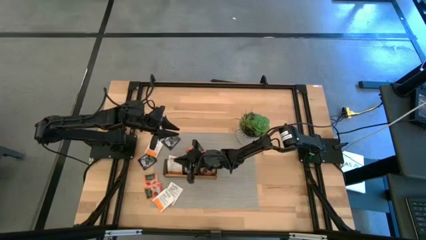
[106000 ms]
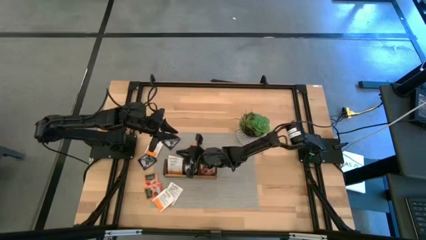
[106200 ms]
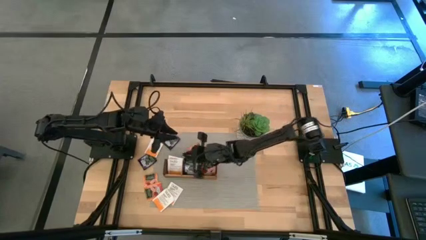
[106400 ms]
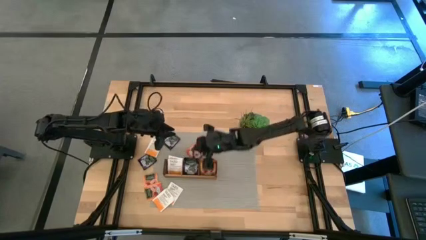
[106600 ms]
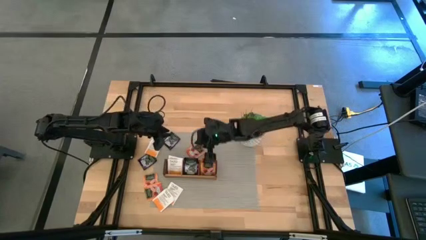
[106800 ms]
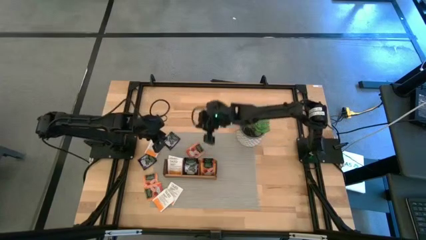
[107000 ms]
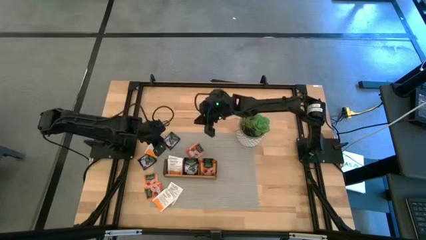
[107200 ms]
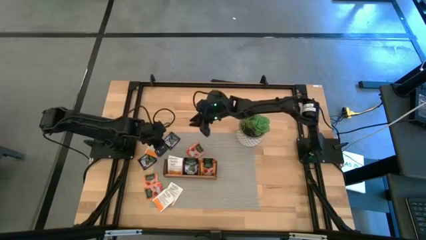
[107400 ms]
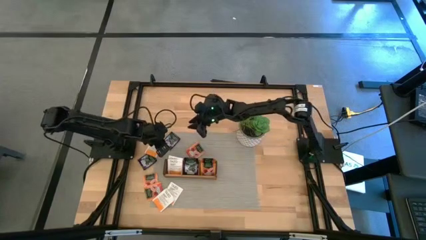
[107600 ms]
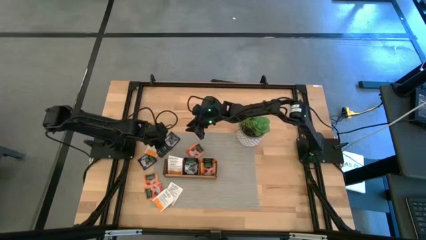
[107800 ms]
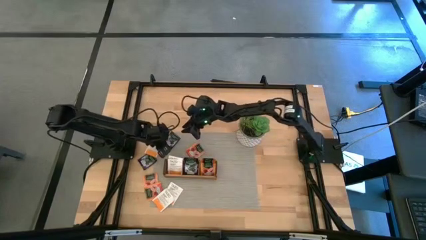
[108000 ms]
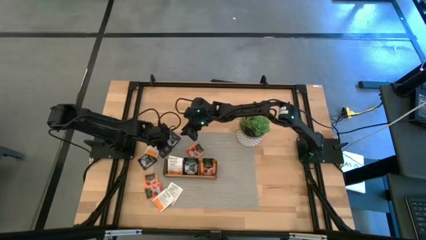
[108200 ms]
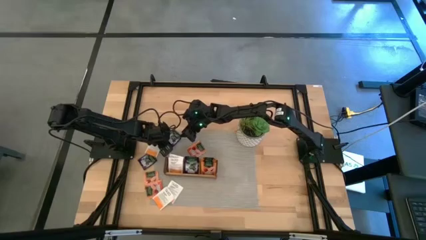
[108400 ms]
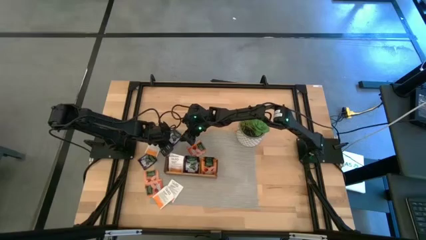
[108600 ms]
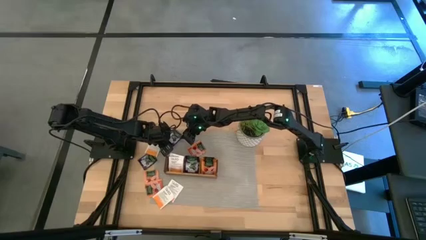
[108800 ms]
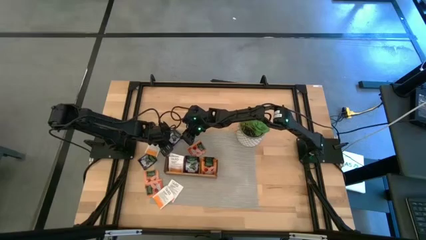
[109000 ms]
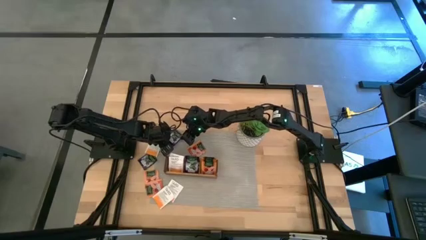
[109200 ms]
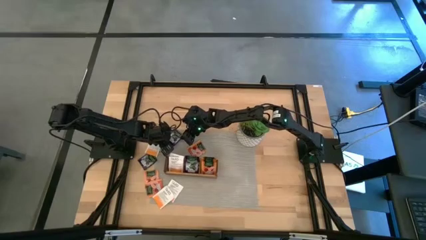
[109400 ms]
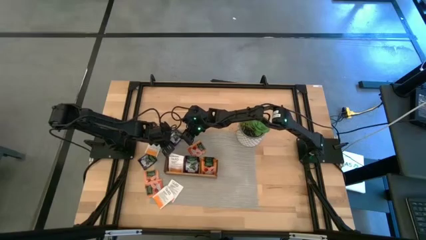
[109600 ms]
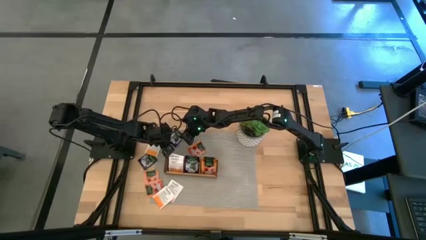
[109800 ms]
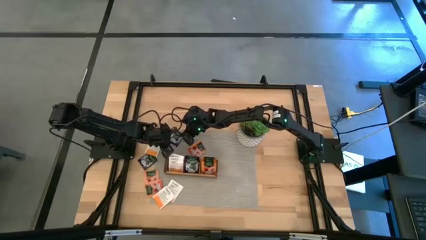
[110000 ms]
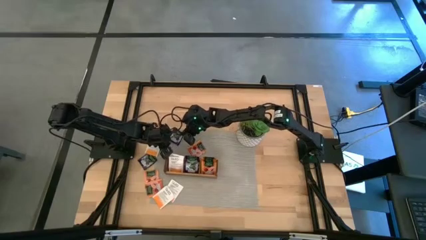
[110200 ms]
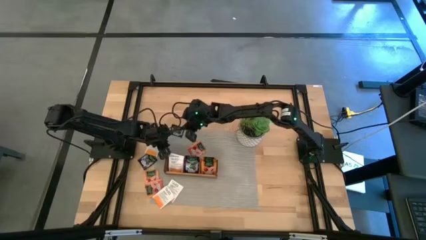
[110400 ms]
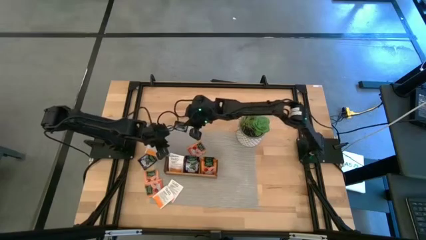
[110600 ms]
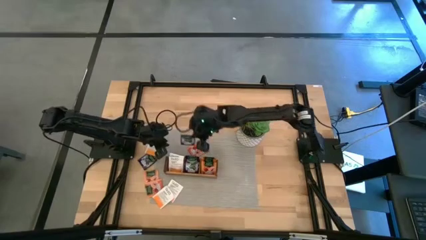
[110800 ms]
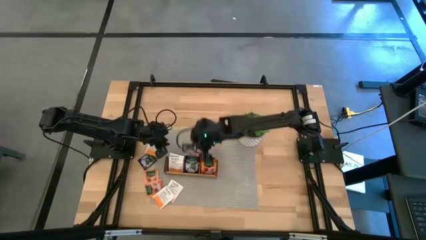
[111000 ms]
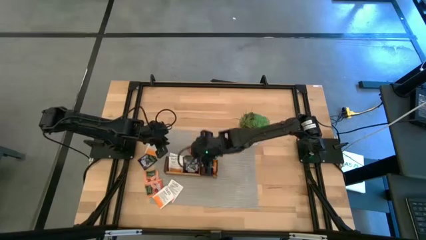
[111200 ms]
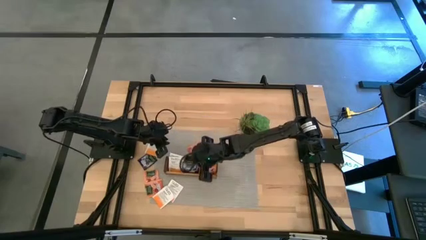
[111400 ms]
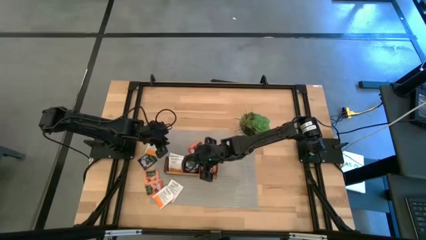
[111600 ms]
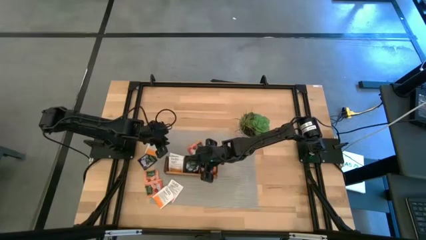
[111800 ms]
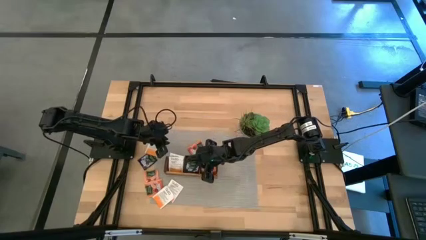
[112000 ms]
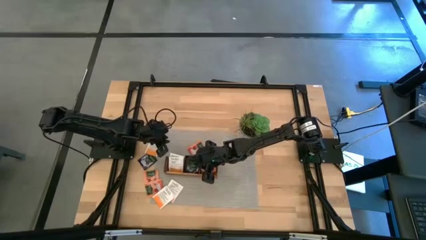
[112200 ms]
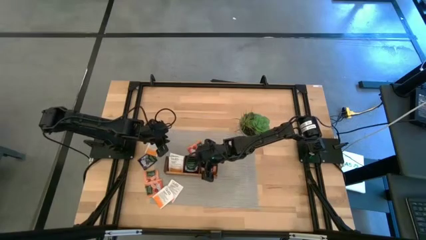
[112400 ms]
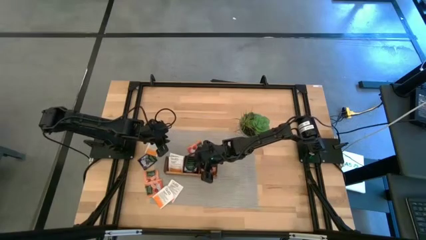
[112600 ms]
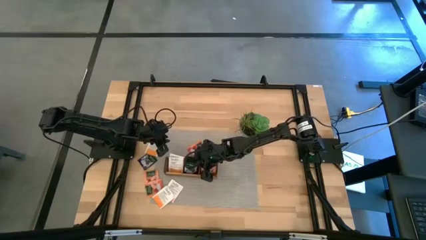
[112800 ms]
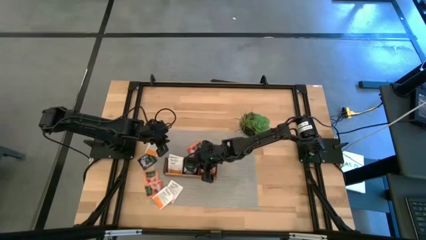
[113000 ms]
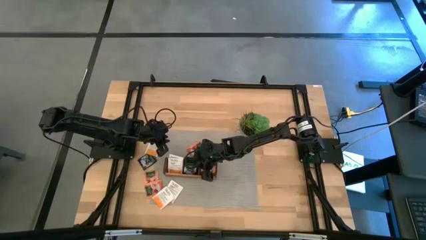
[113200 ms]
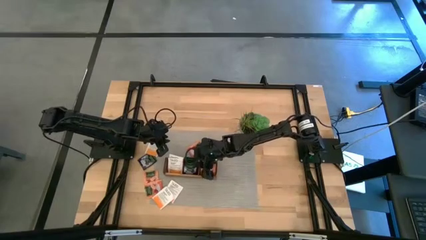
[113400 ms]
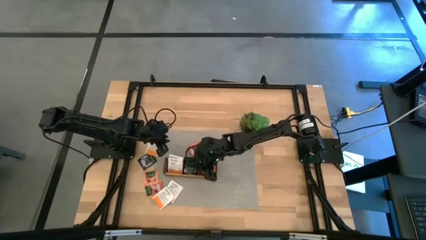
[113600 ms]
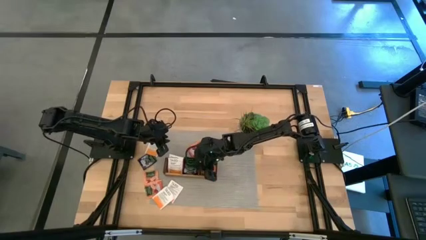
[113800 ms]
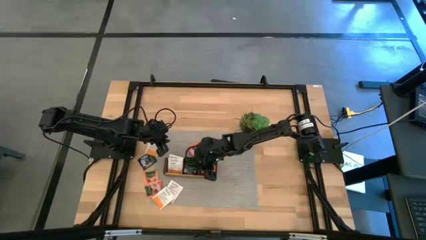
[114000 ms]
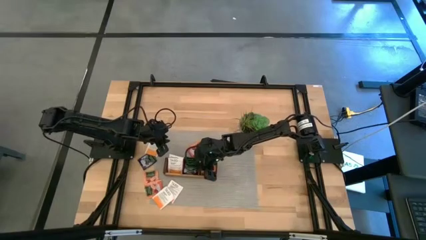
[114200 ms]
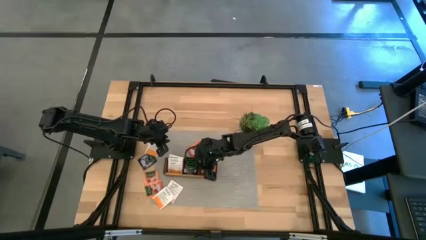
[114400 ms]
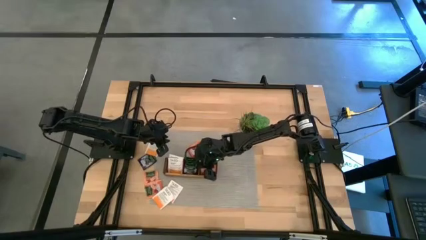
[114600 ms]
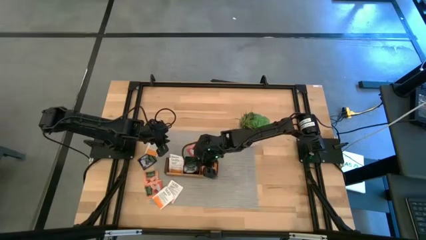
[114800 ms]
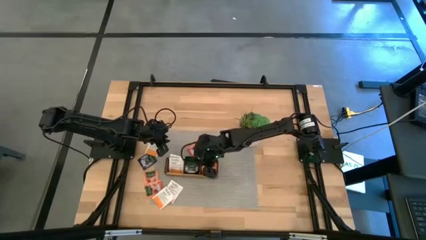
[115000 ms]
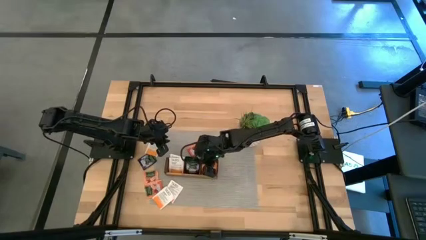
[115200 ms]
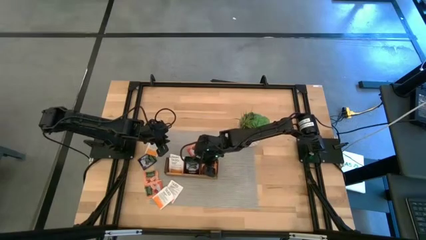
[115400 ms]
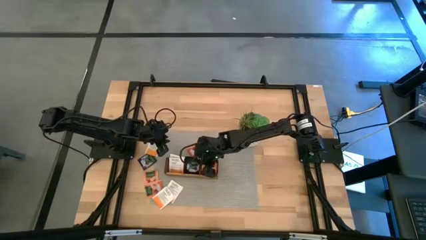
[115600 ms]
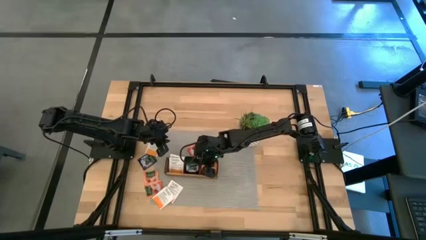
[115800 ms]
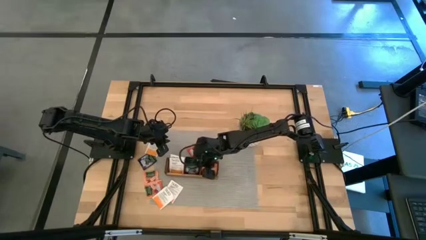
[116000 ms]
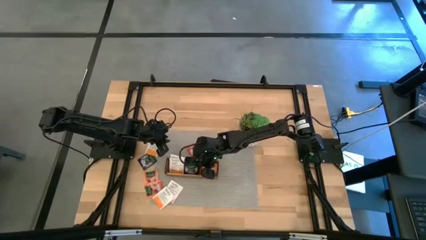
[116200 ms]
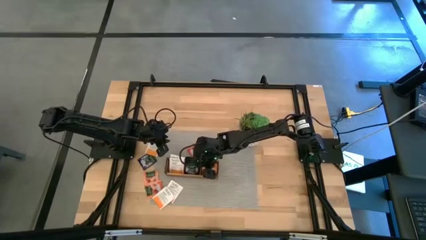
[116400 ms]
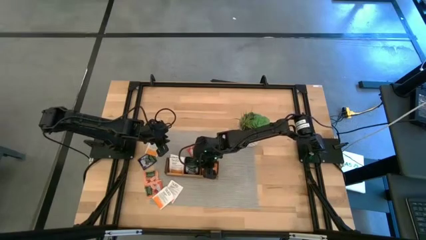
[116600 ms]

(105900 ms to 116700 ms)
Task: Pick & Place Tea
Put the violet tea bag into the middle section of the wooden organizer

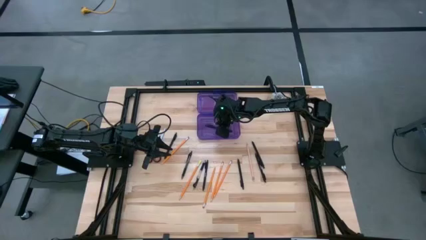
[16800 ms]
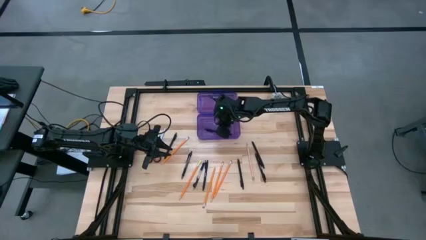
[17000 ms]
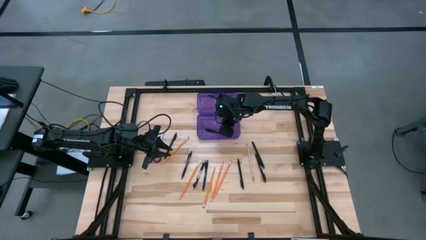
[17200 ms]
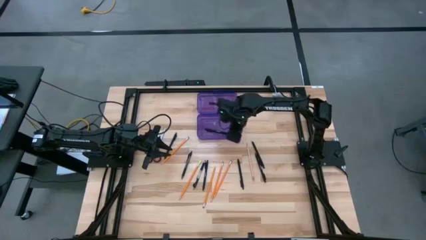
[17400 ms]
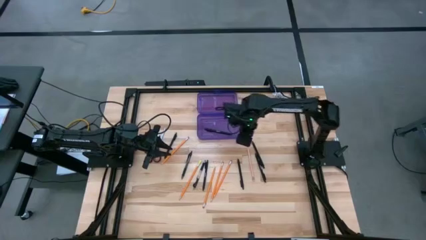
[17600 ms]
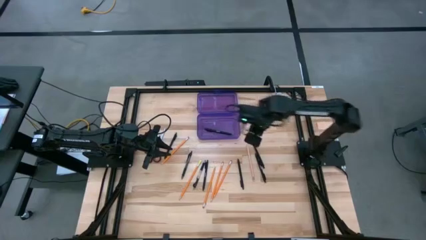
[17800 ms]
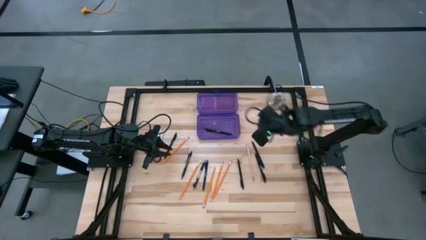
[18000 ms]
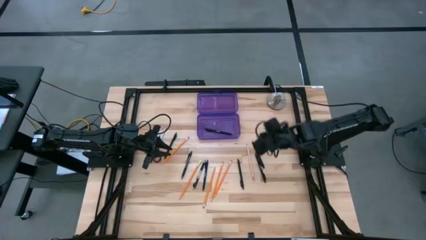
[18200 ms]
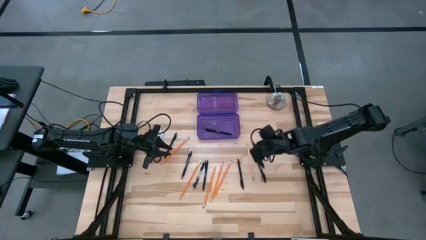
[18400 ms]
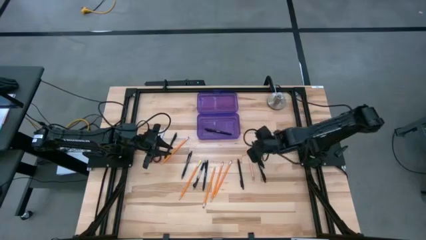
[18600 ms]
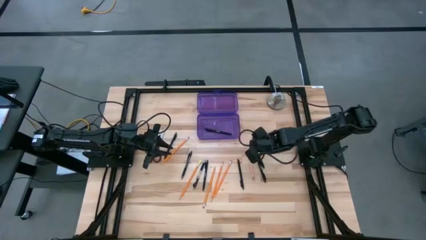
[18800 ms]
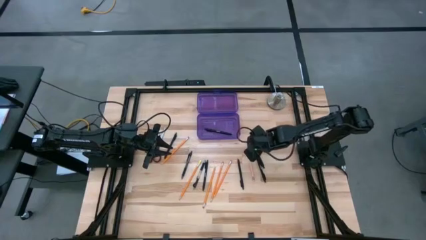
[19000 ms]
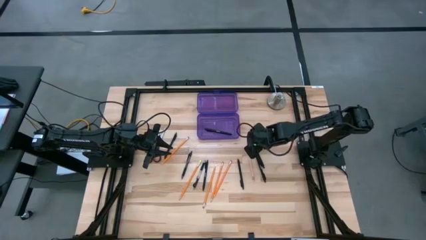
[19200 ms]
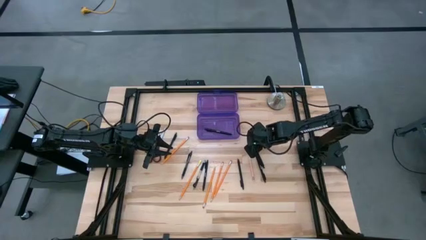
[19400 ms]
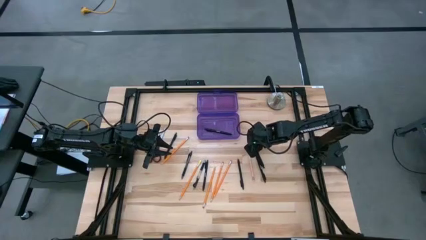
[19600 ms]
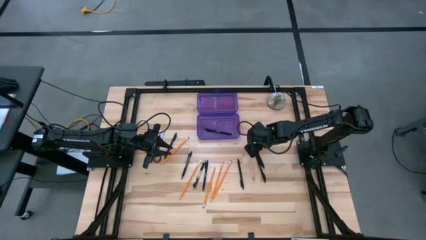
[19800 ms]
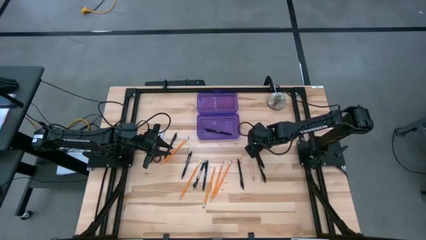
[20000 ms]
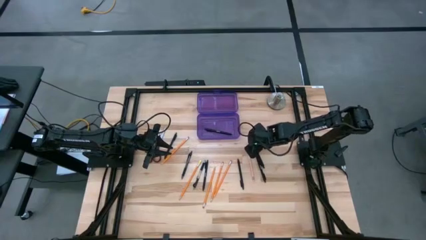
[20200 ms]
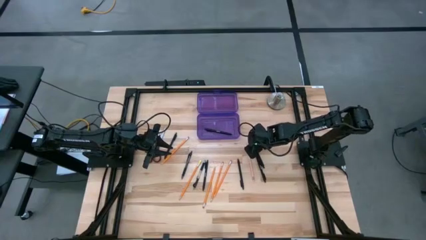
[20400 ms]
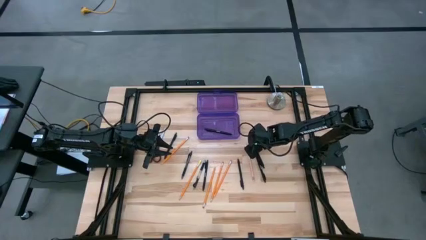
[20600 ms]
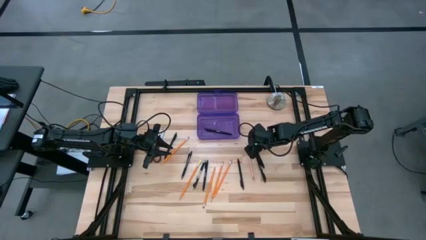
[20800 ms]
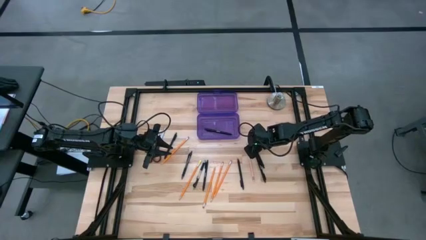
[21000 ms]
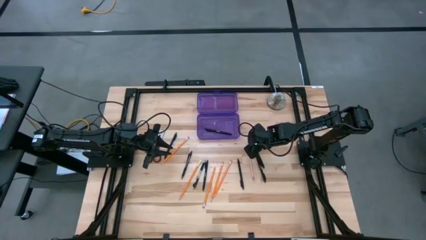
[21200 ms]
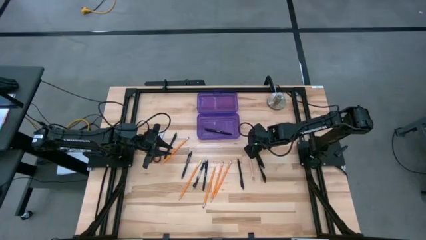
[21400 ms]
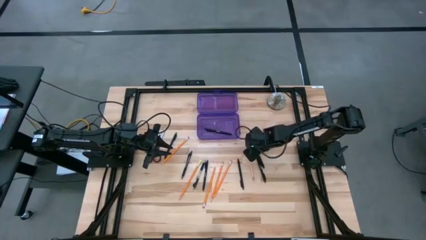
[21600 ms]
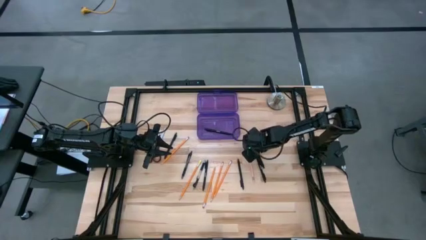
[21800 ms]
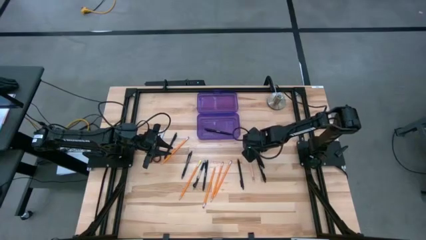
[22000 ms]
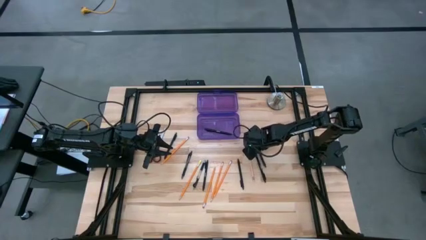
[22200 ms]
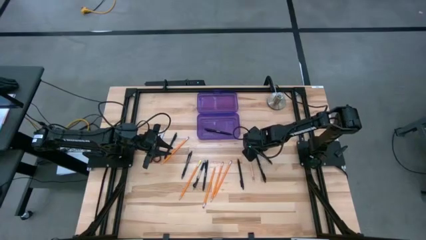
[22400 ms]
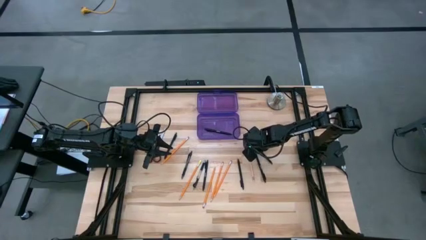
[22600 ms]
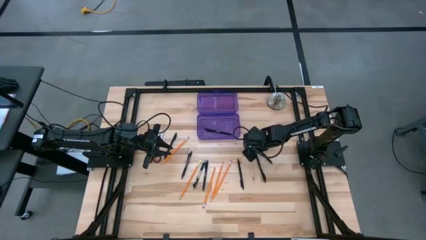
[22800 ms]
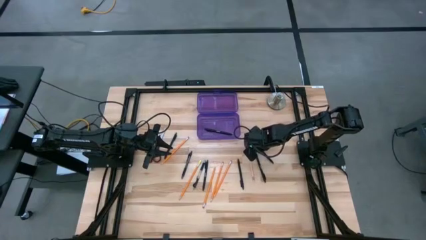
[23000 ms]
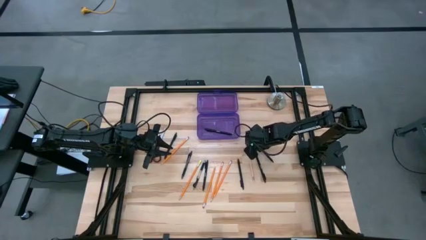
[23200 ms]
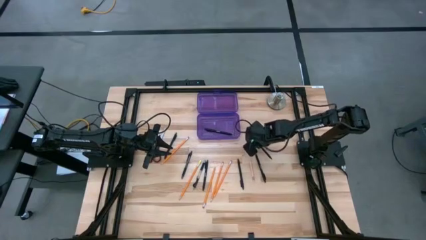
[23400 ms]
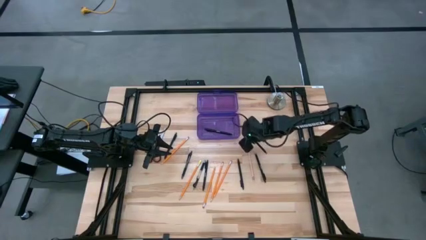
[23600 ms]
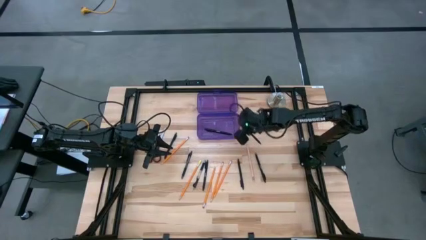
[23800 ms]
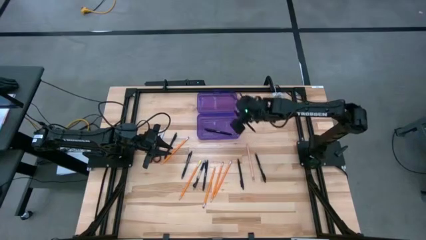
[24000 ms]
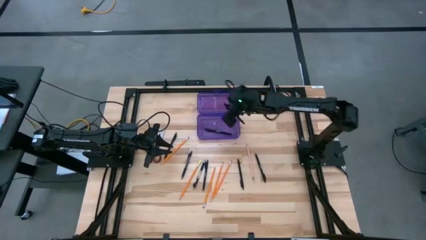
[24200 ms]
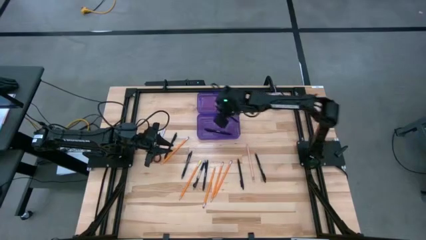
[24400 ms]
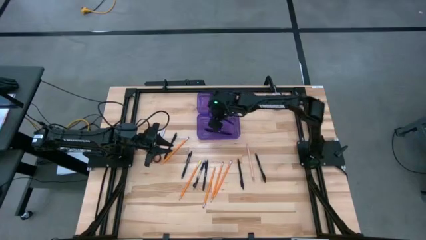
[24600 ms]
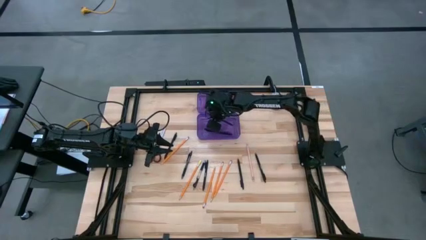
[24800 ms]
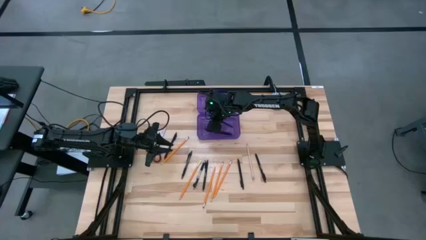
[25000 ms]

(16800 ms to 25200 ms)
Task: Pick & place school supplies into a supply box
Put the black pen into the the purple supply box
